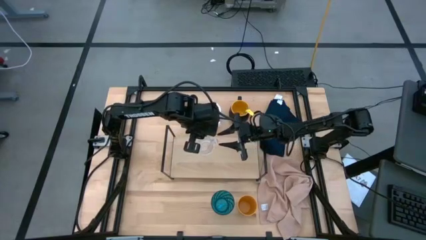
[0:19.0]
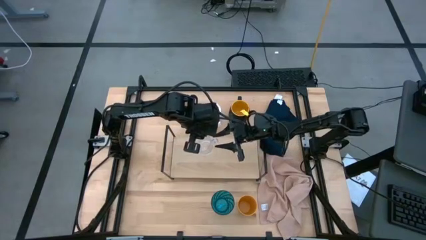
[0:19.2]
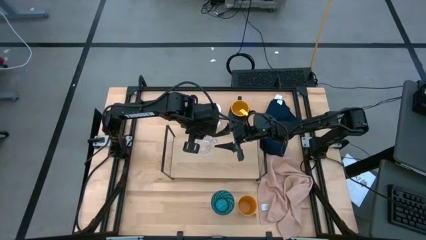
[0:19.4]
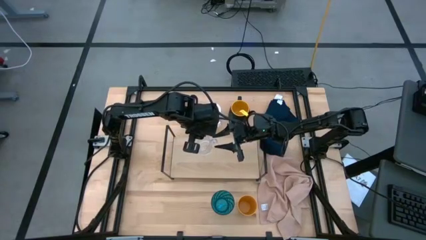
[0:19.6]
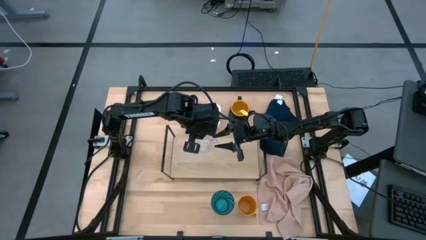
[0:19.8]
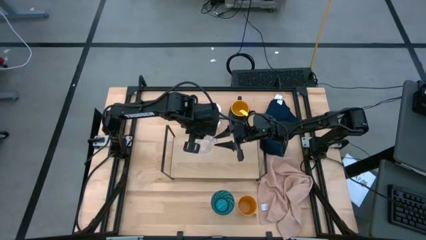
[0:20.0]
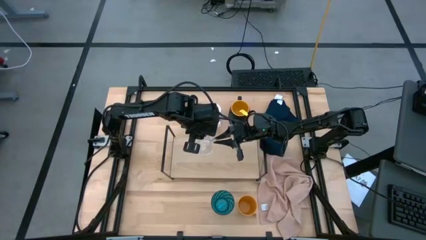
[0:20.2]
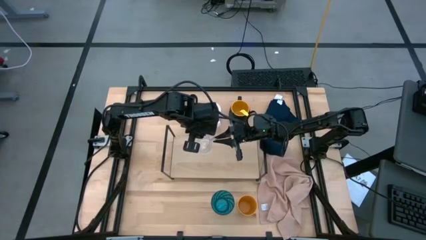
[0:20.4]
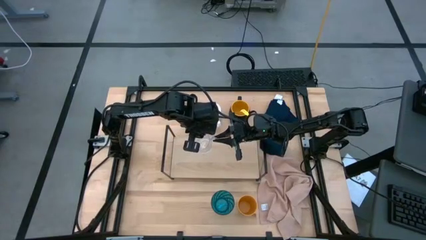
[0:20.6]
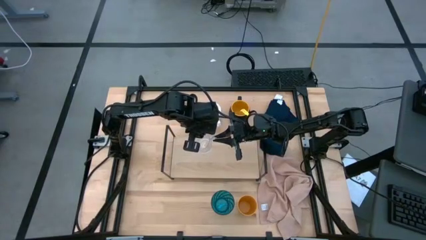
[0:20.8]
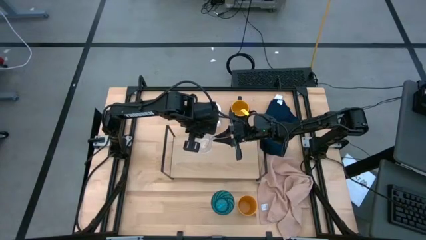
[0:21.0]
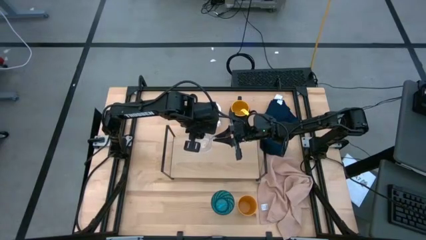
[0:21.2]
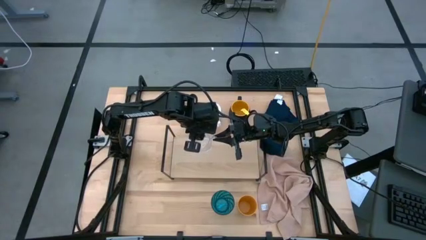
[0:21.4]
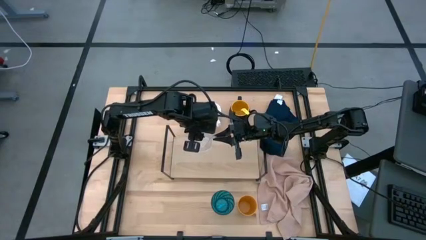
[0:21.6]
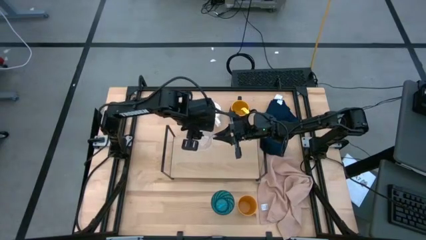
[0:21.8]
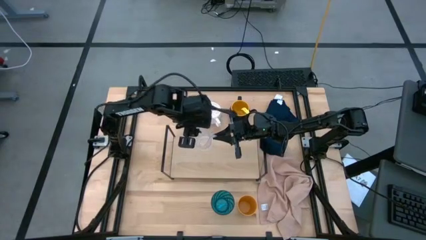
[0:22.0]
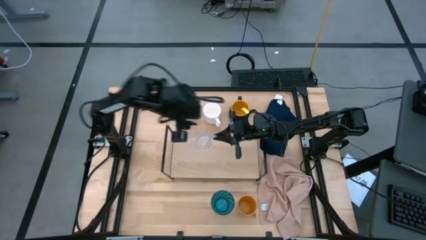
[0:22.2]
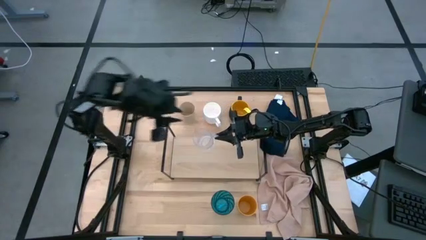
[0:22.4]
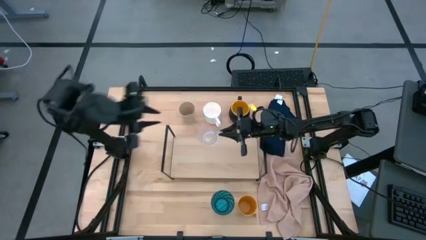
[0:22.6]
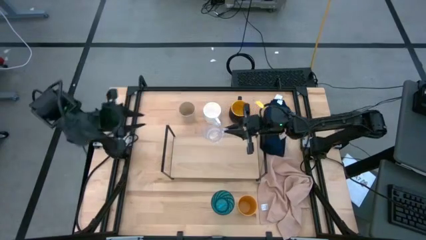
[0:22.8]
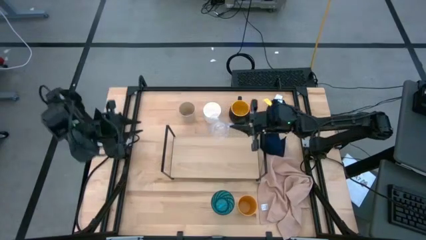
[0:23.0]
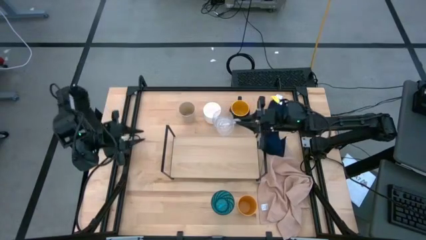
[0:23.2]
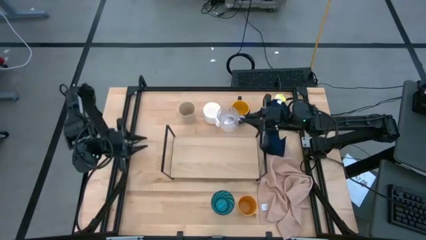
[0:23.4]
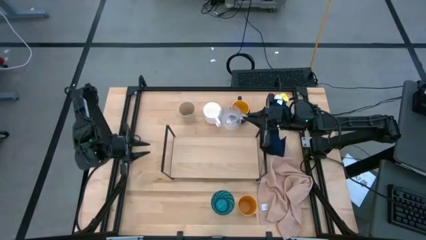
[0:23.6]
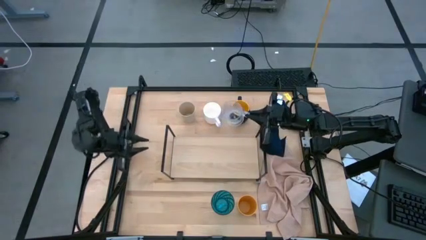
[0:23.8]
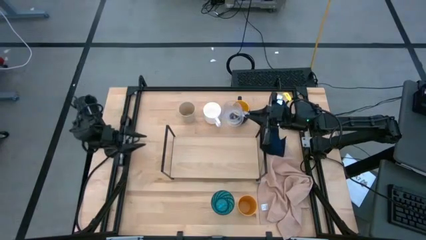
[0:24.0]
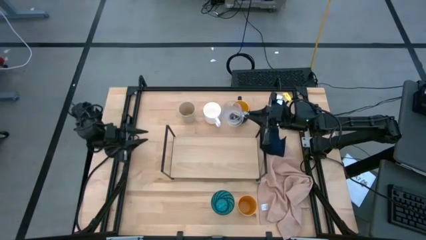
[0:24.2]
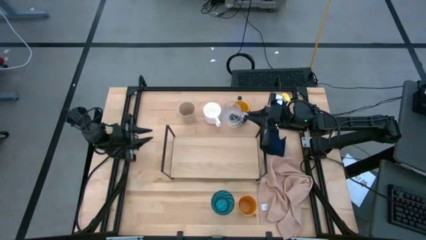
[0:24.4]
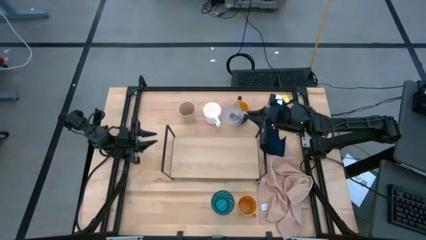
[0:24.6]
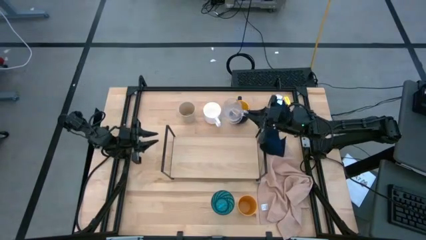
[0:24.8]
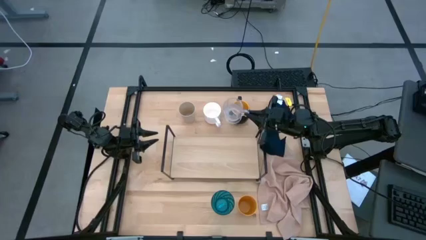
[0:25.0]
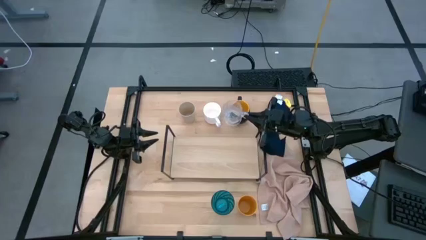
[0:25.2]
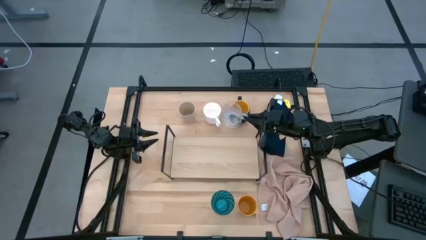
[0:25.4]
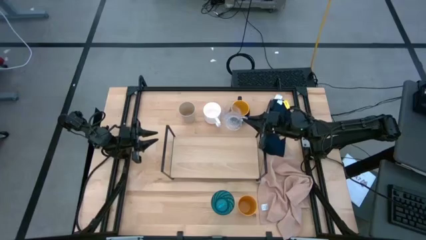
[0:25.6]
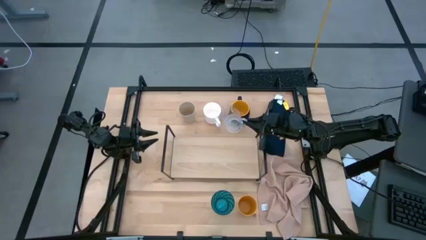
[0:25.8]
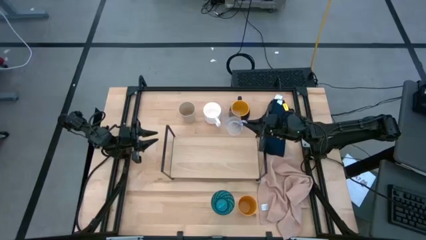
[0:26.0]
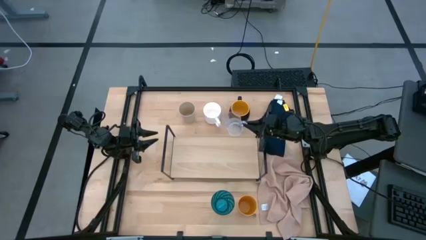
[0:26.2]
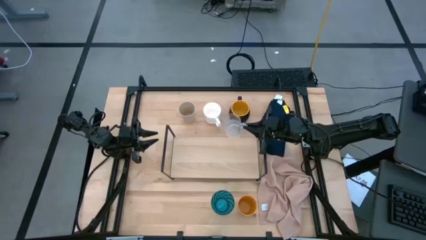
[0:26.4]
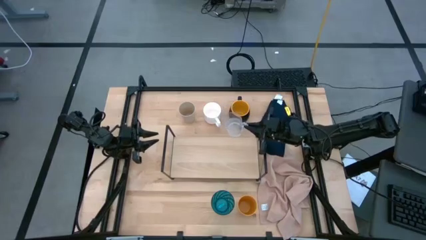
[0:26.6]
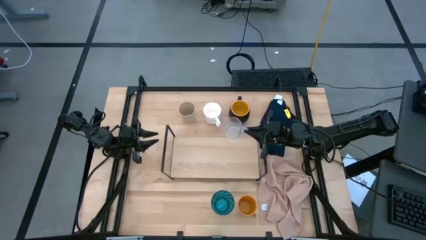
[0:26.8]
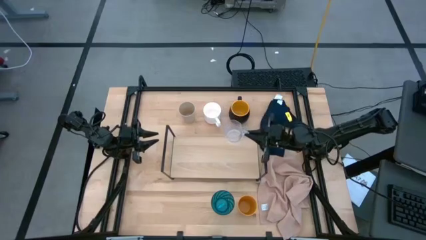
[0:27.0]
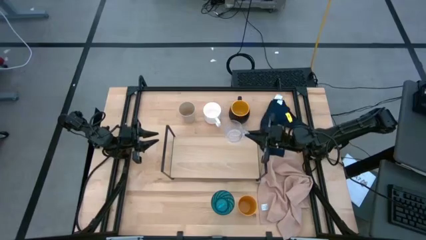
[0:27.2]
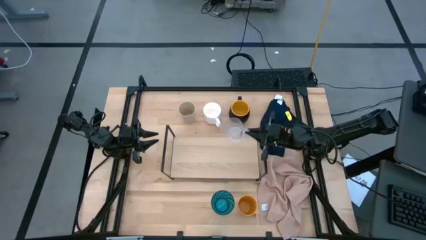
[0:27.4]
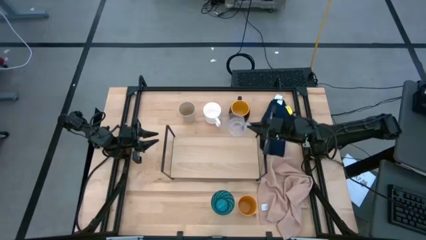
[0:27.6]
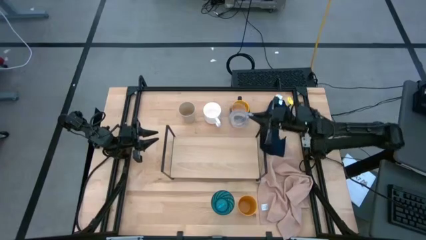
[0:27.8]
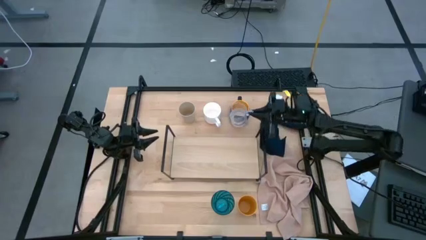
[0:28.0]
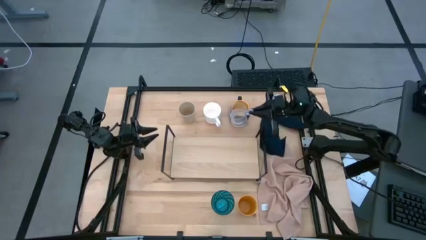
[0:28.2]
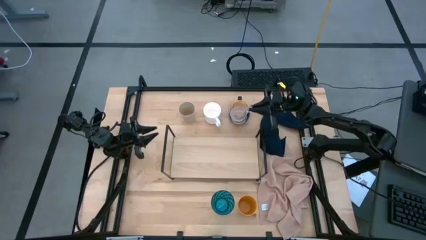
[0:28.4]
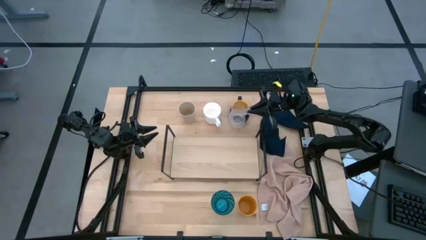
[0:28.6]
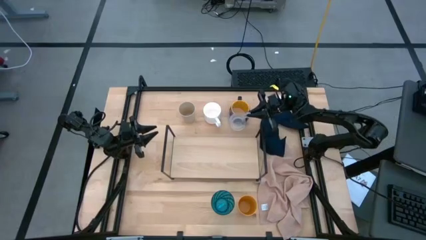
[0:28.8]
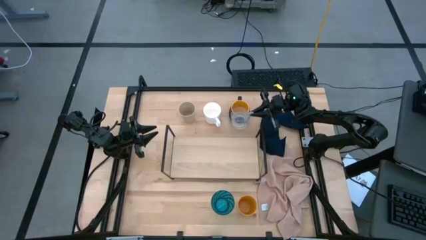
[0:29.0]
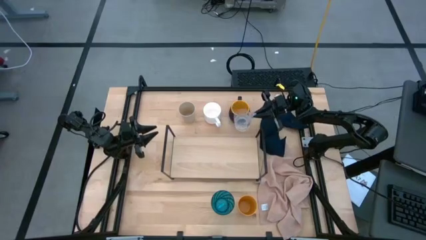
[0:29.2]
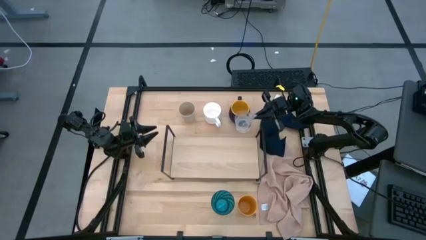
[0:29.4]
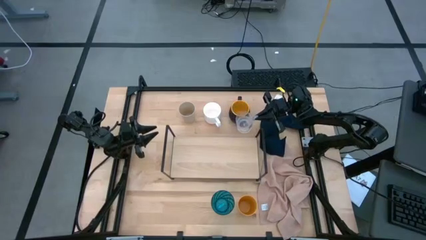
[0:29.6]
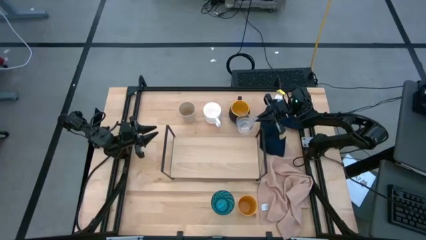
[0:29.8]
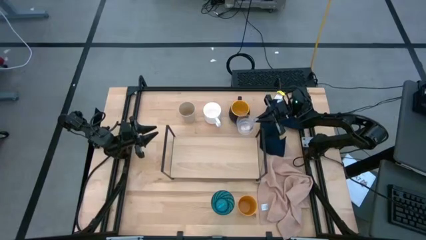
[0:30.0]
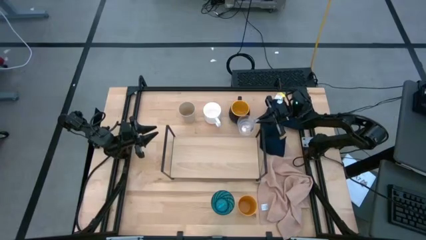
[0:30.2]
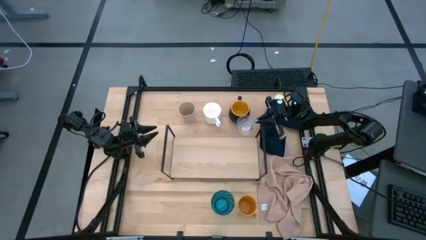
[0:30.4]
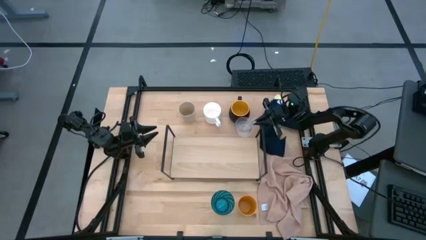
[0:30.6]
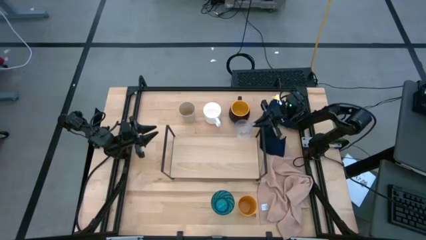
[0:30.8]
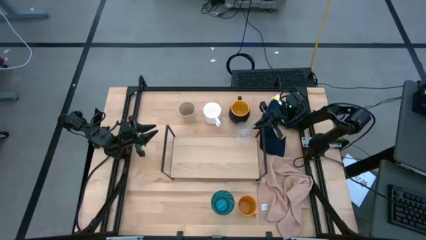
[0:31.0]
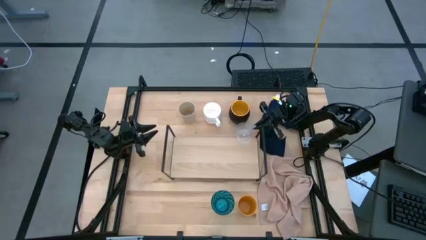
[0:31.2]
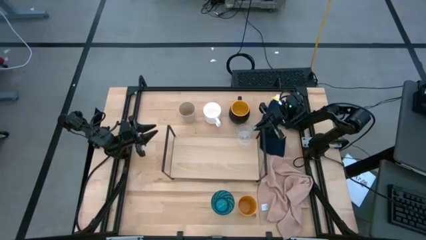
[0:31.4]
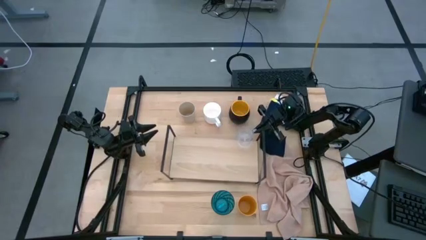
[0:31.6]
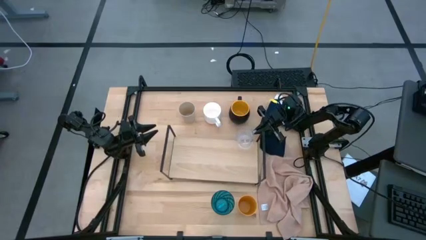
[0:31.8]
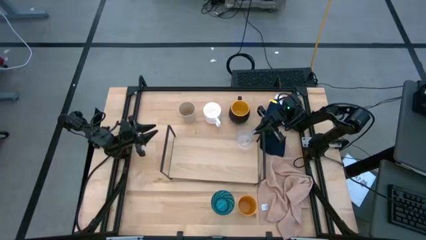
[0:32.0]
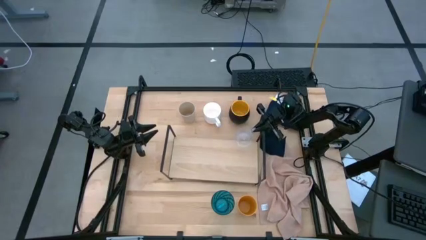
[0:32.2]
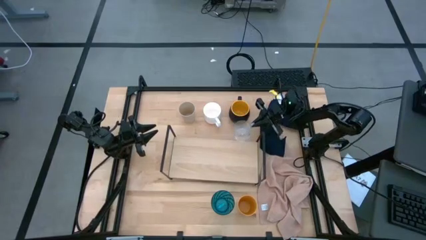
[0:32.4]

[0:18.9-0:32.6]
Task: Stack small to large cups/mugs on shelf
Put the transparent mug on the shelf

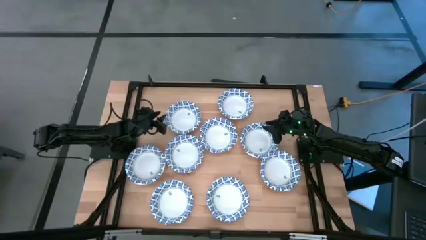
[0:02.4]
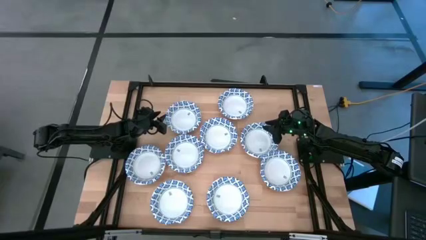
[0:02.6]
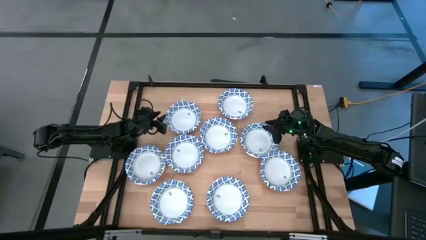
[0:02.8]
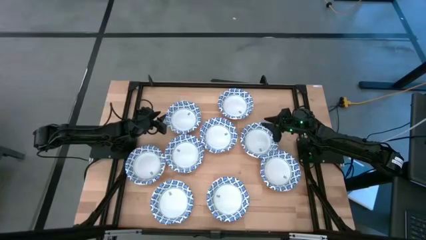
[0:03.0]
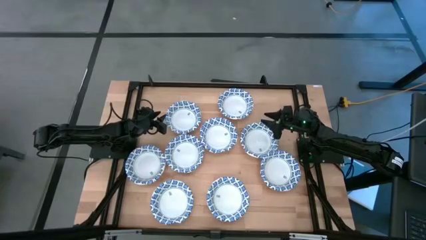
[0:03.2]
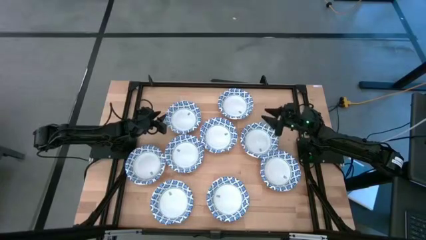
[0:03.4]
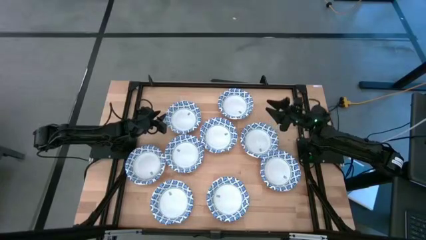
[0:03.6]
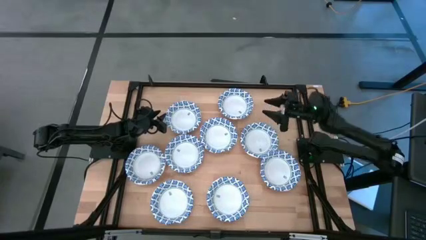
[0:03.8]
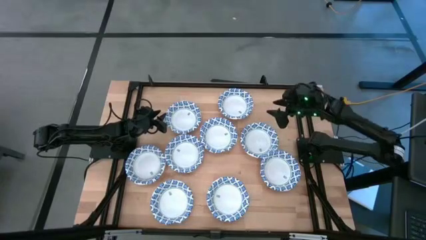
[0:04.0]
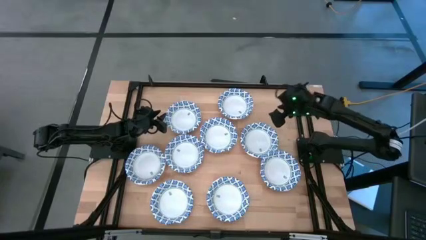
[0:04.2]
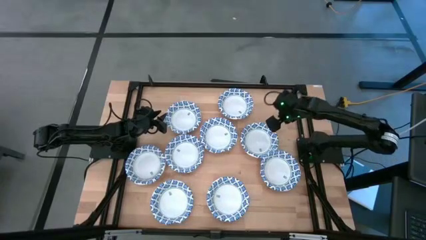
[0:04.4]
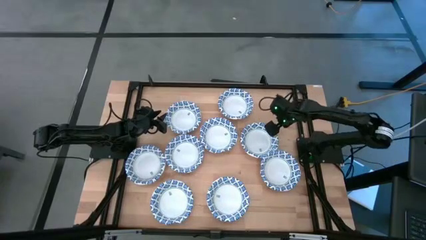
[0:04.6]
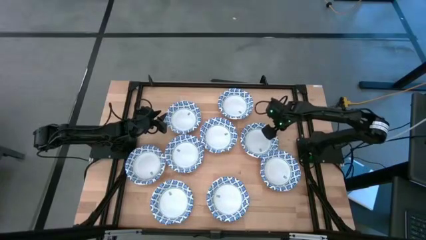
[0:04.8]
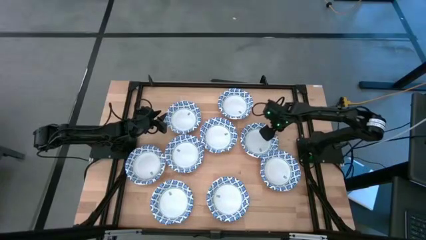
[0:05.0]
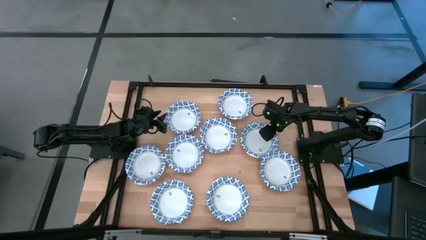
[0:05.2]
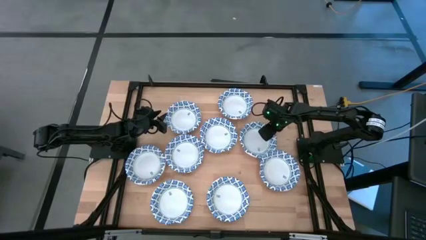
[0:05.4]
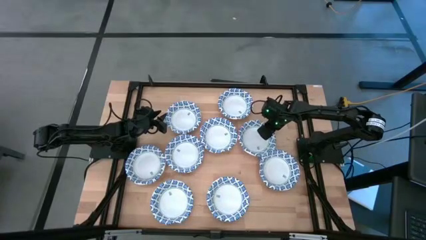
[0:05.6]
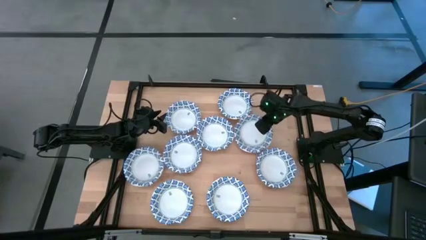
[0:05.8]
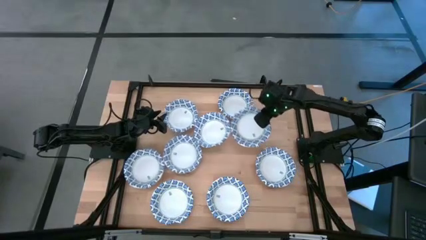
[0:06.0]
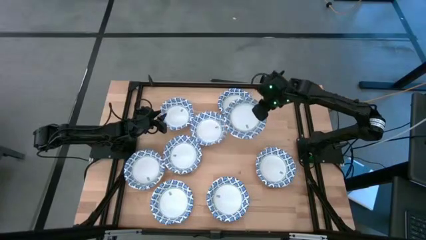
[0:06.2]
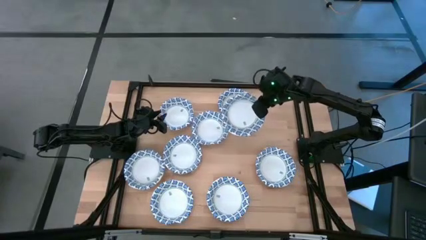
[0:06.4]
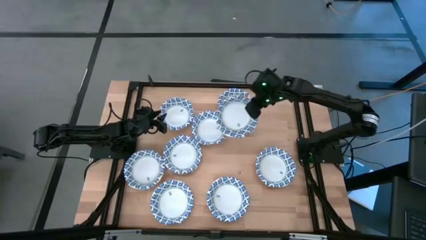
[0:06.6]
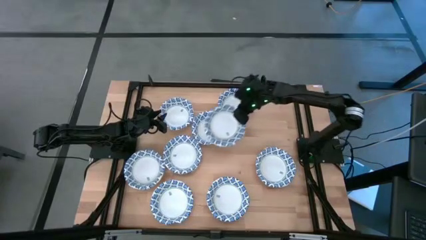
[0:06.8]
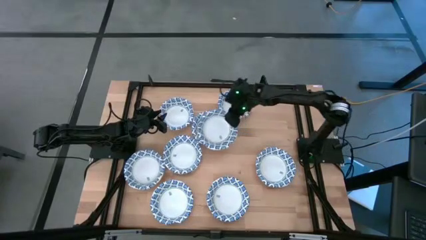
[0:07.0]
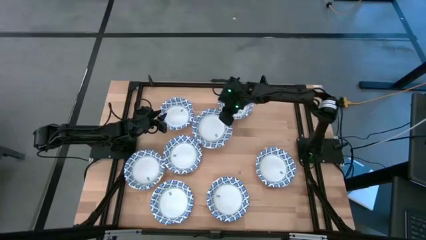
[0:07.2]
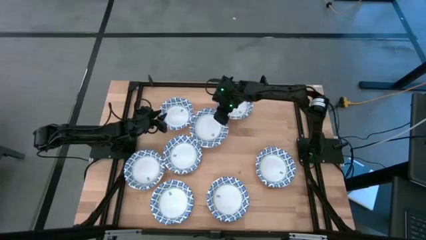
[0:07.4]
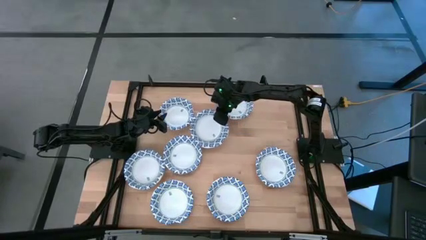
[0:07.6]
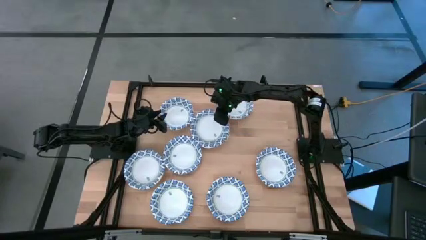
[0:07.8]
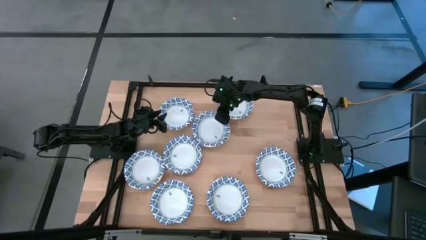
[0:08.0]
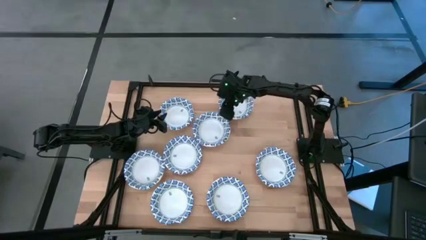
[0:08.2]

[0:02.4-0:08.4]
Task: Nest bowls inside each other
Stack the white and blue bowl on the white and blue bowl on the table
